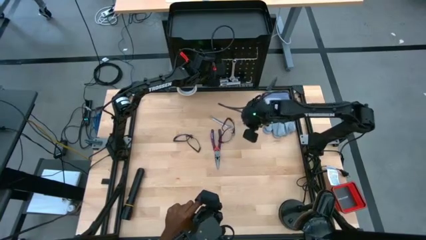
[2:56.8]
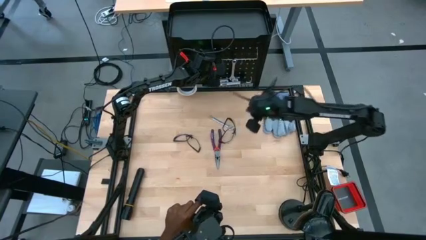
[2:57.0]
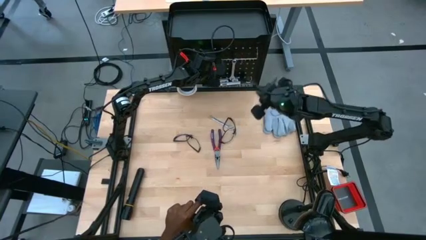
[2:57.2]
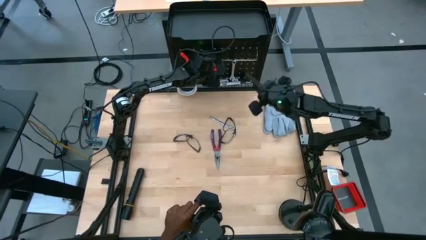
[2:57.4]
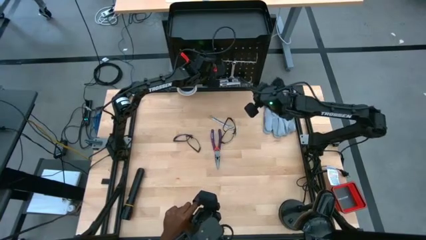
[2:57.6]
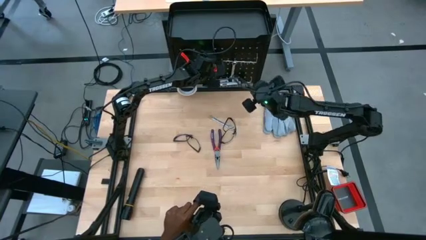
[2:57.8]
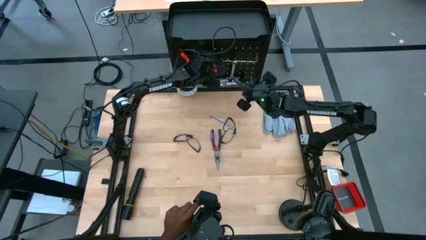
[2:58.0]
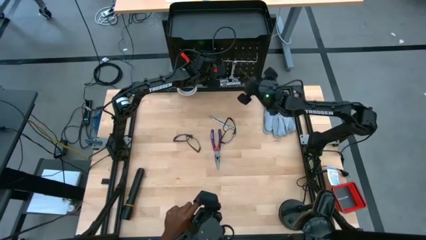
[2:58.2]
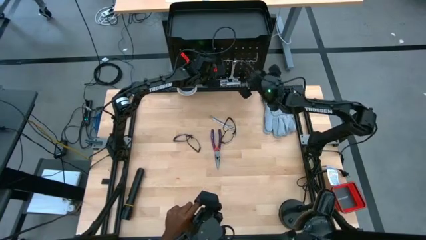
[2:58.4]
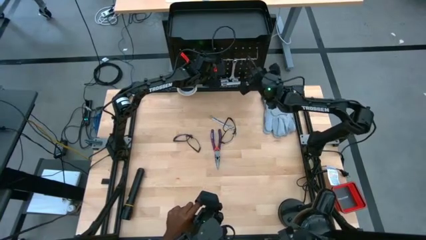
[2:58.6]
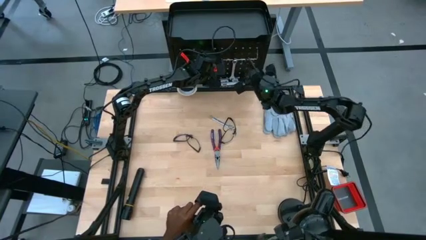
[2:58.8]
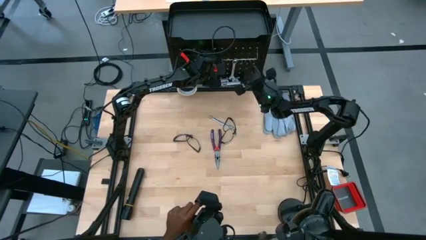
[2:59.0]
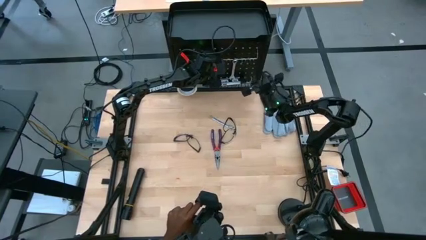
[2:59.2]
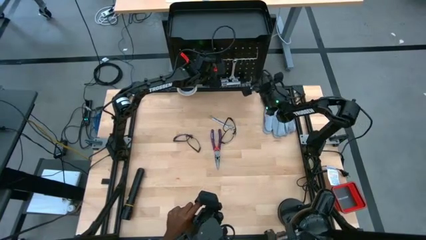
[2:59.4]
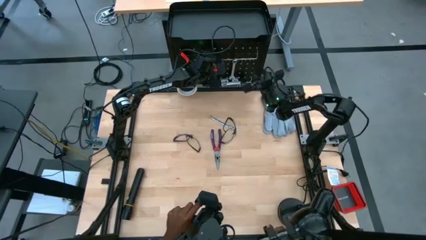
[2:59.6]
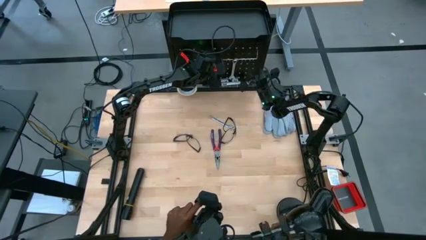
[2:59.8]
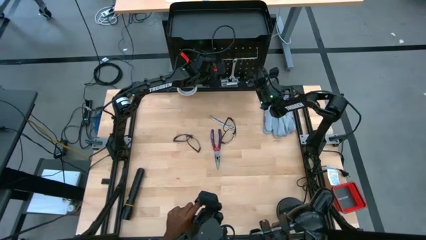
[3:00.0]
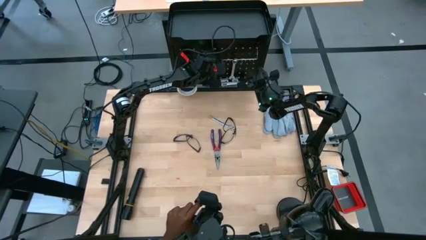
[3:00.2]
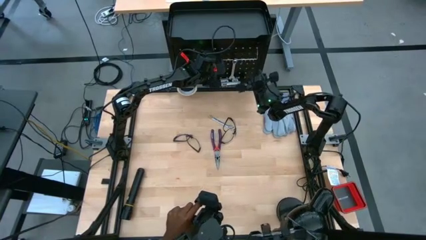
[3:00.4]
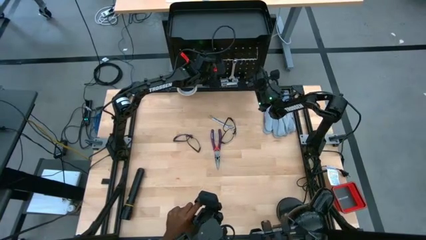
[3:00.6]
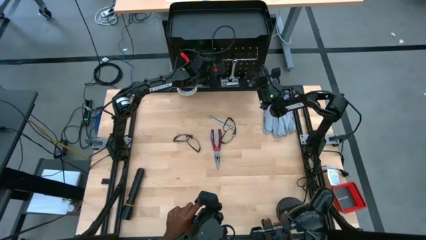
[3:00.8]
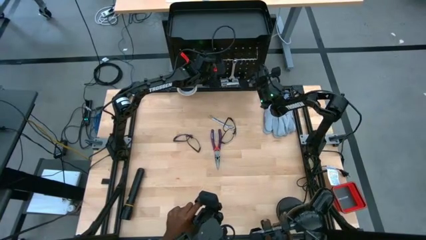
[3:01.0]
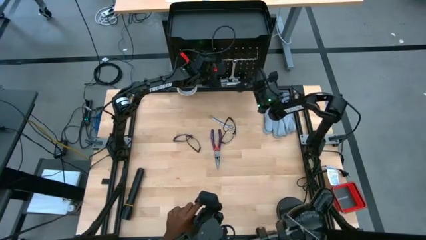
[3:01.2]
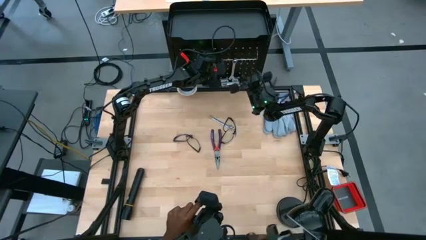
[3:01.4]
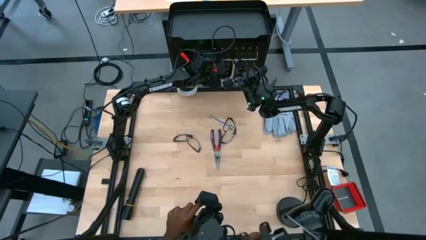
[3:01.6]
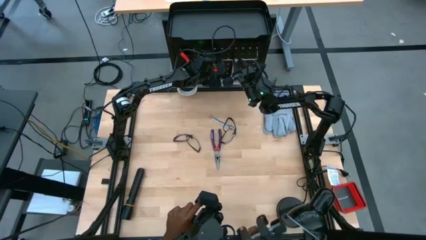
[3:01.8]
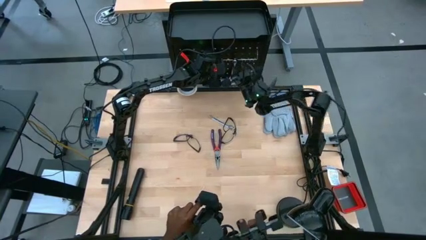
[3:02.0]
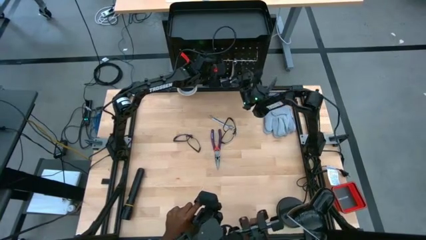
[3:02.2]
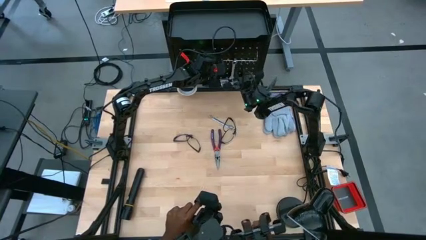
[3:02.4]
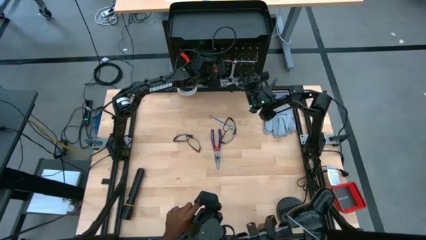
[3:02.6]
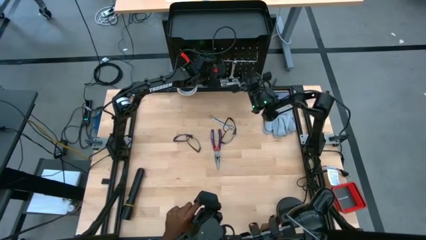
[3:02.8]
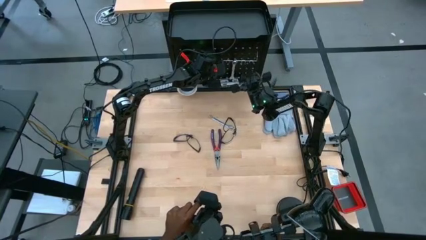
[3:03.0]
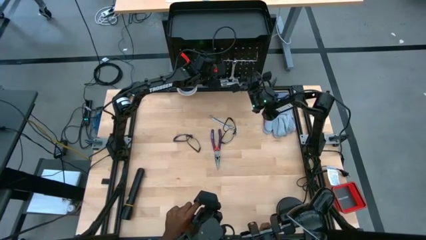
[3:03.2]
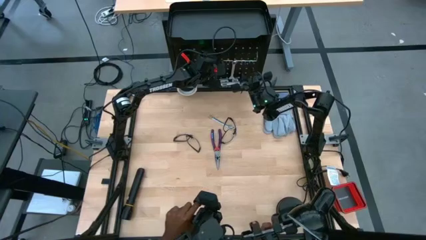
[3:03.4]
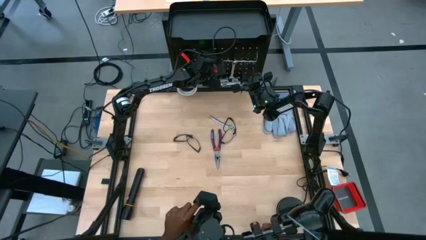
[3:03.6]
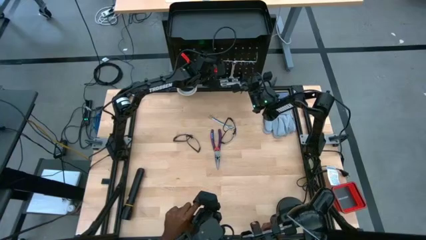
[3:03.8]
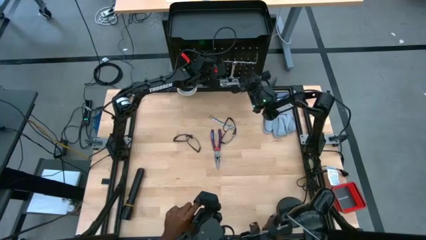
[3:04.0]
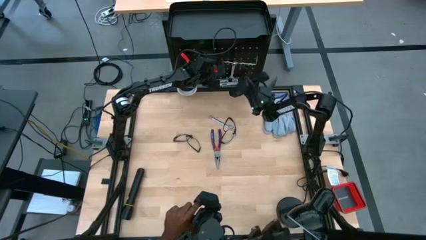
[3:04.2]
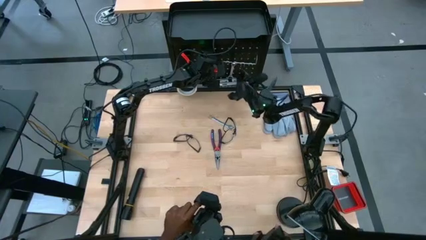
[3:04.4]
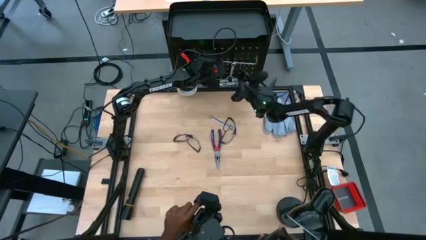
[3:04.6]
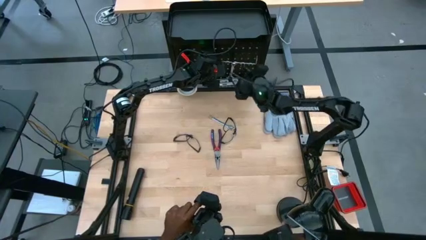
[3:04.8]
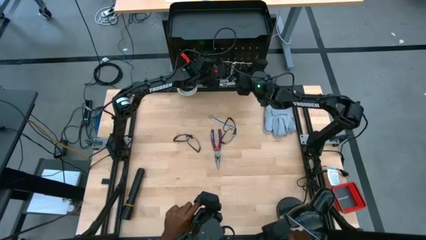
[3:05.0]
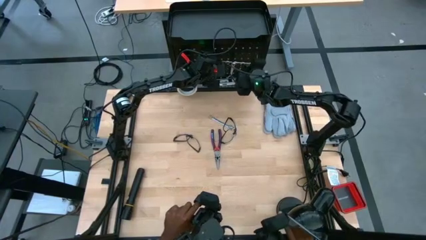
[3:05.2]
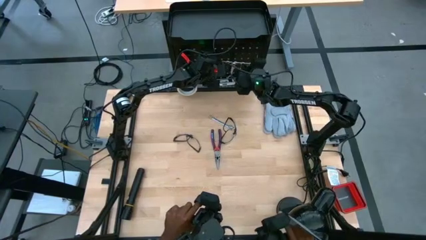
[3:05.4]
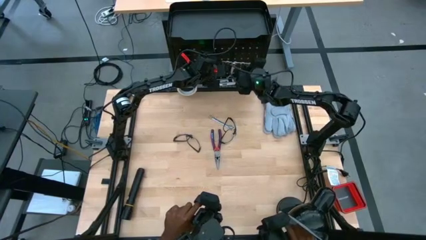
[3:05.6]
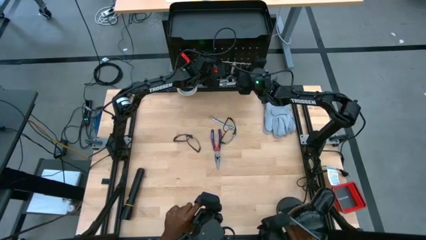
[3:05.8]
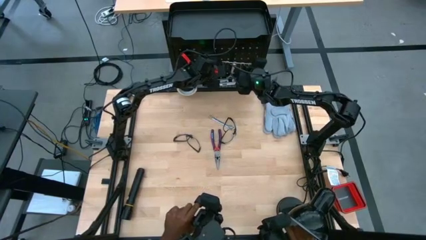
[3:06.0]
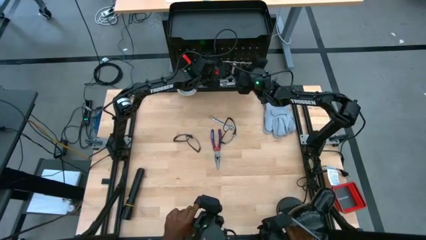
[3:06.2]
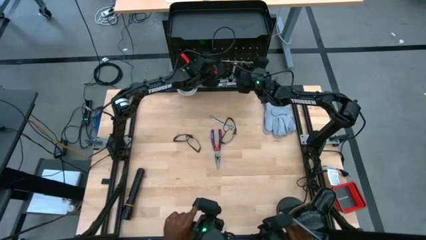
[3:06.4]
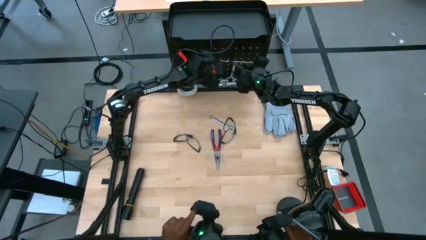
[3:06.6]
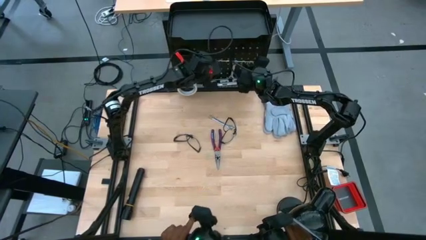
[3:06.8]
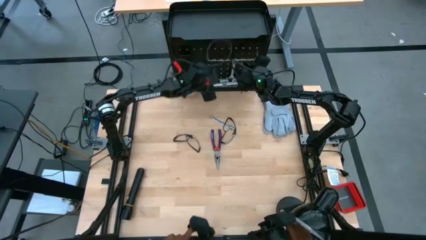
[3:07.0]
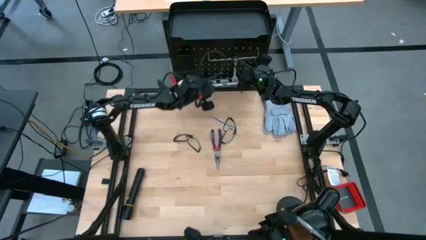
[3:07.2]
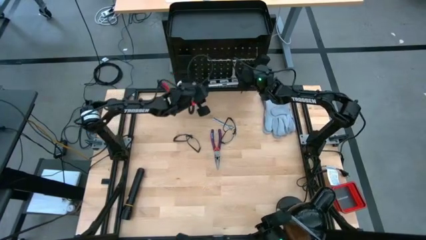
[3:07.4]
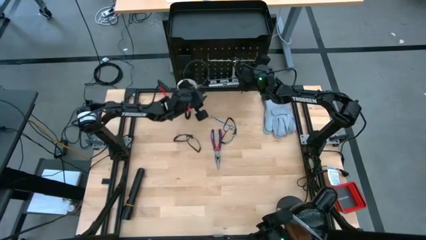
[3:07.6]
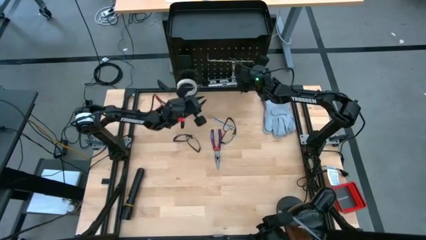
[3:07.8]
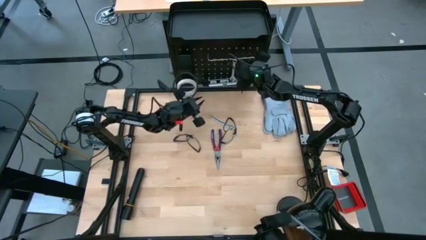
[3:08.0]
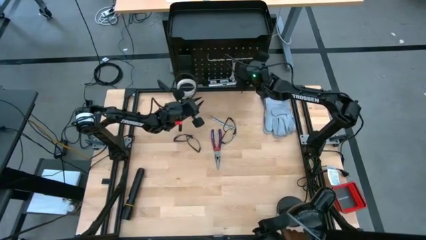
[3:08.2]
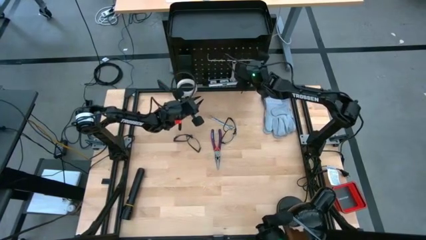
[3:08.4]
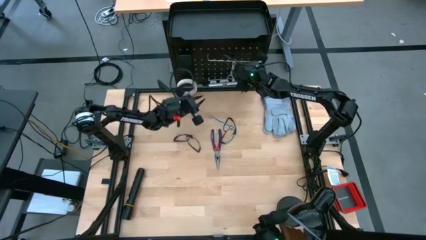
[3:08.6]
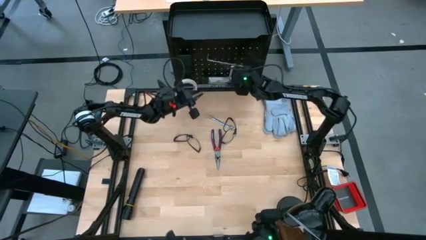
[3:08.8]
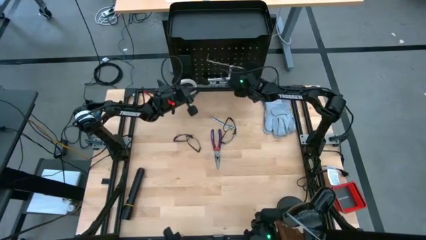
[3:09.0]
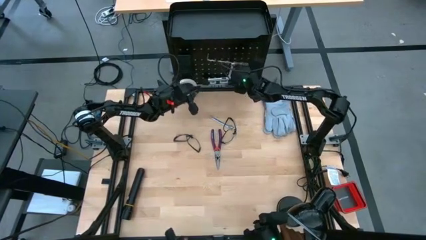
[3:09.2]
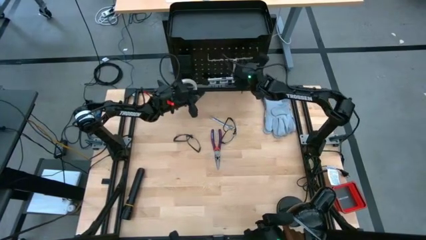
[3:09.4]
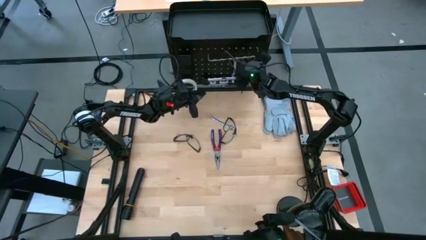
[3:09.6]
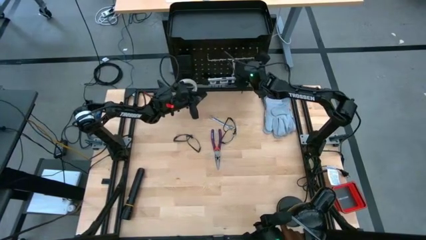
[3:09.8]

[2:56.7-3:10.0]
Task: Hang tools onto peg board
Assemble the black pegboard
